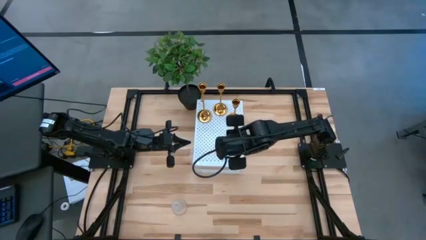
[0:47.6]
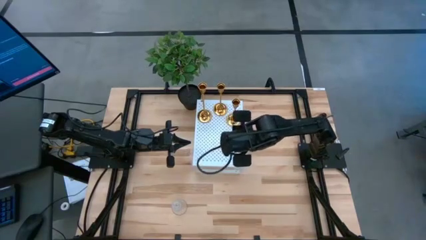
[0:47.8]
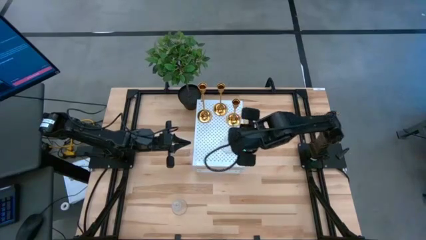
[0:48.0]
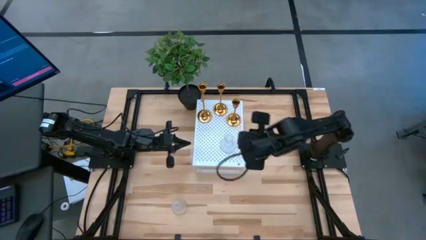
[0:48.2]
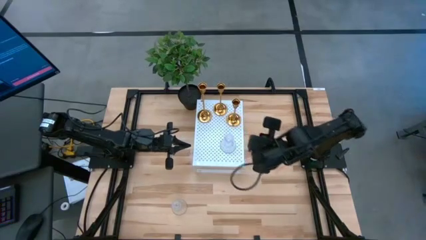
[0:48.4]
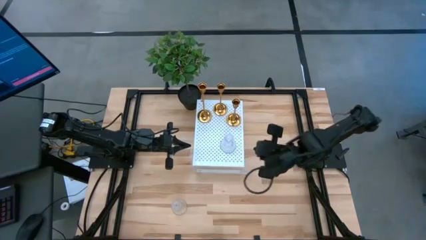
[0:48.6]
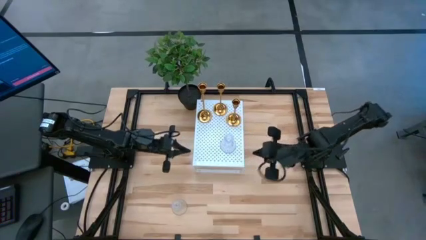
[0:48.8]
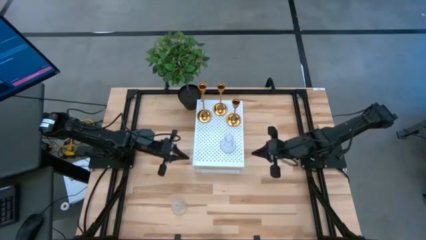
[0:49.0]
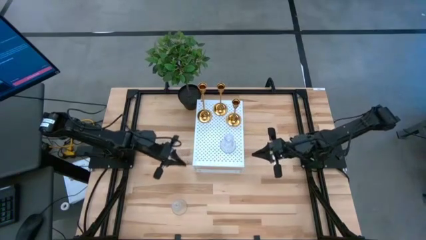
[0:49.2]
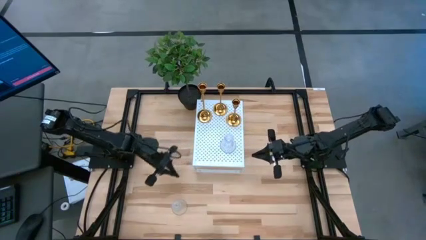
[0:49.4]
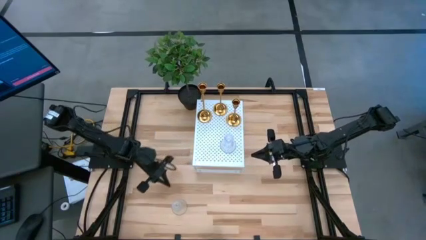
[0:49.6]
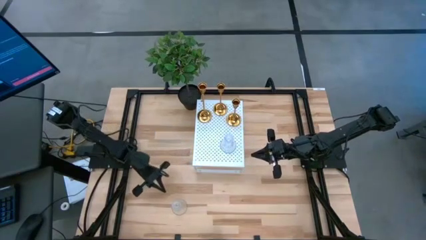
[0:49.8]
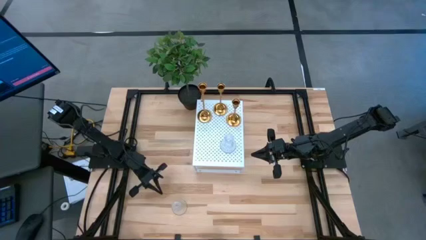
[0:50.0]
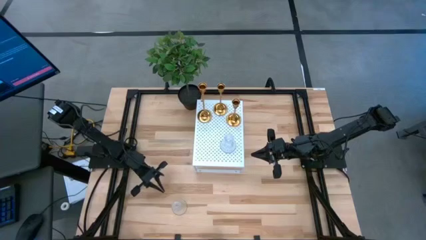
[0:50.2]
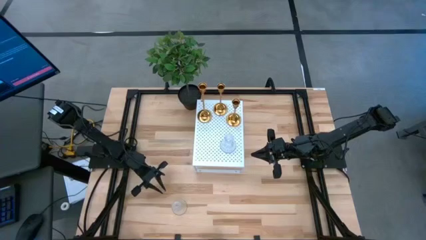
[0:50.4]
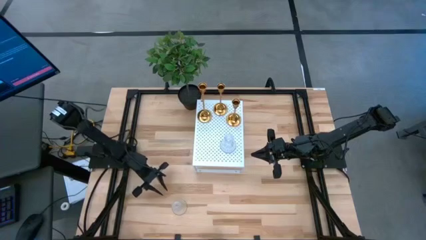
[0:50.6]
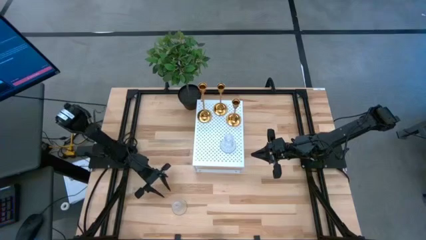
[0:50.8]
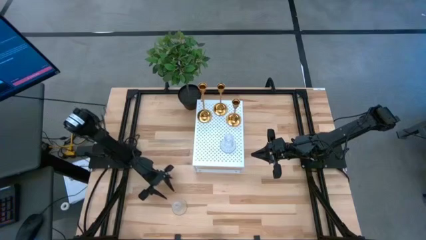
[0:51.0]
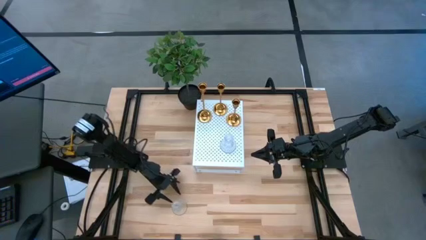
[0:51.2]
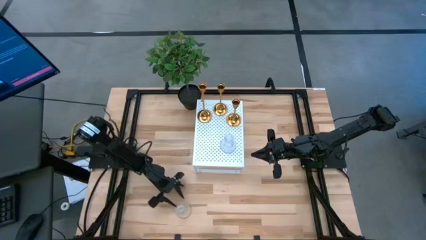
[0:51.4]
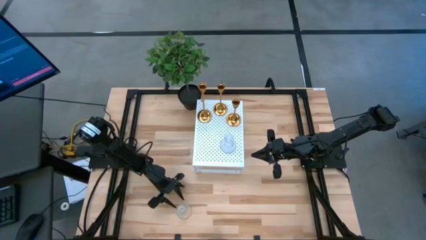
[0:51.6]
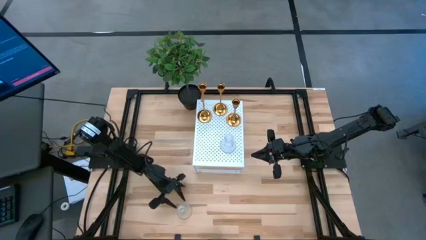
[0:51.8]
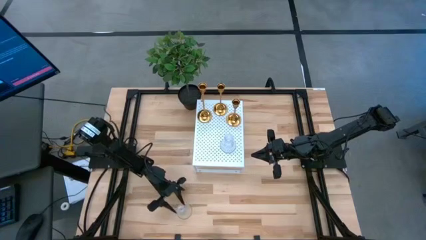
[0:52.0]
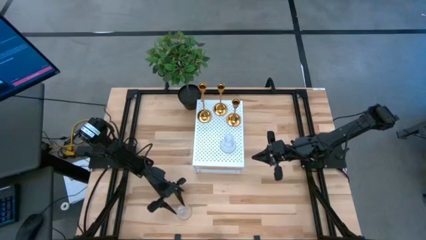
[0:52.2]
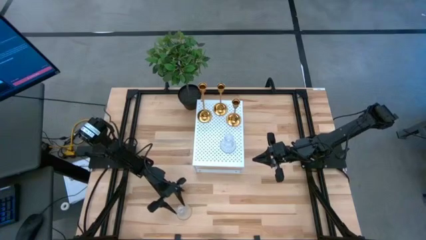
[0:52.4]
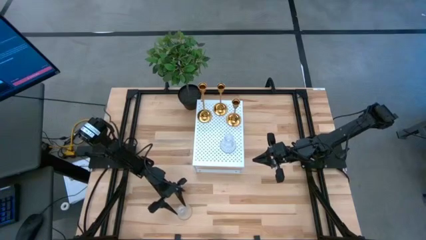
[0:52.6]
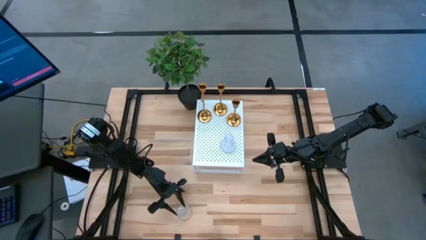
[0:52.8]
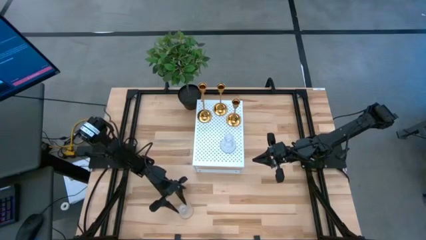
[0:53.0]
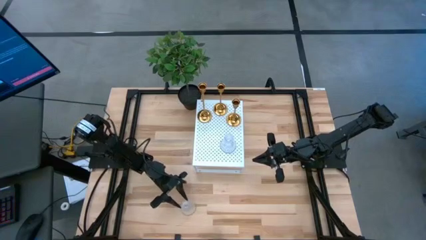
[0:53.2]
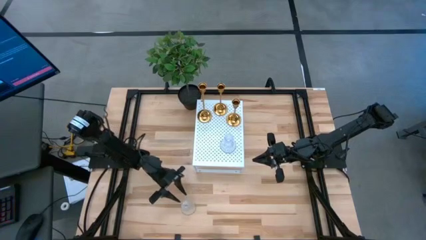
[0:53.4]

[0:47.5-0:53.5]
Task: Pick & Place candle stick holders
Put the transparent candle holder on the shelf

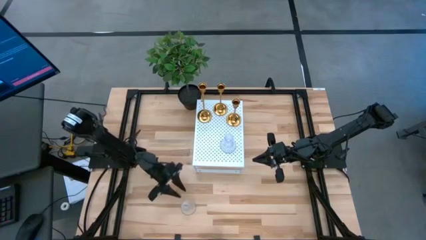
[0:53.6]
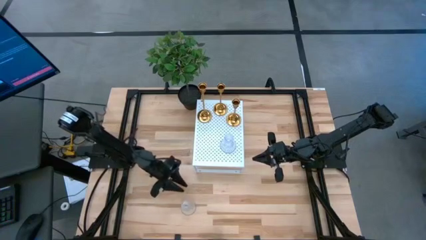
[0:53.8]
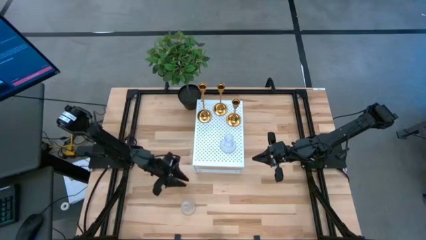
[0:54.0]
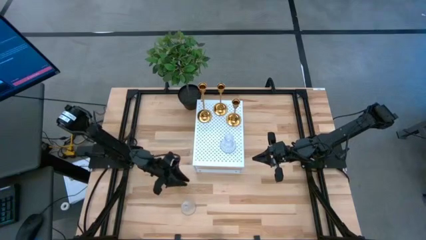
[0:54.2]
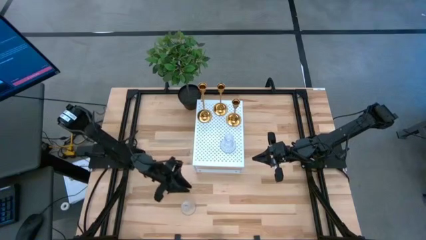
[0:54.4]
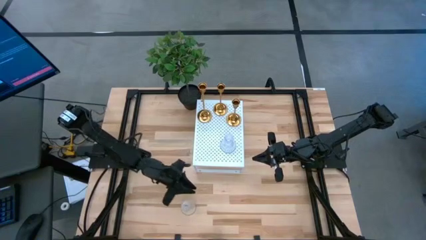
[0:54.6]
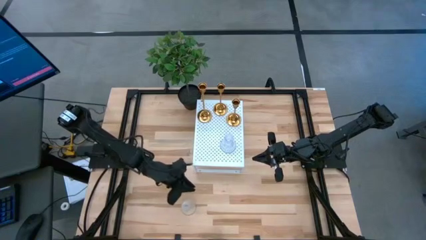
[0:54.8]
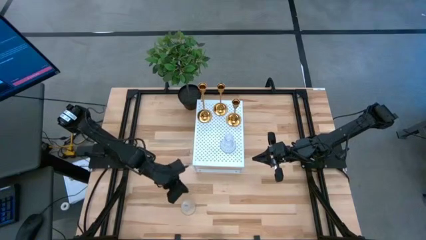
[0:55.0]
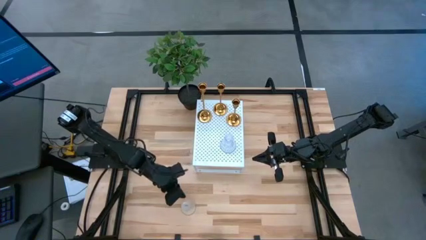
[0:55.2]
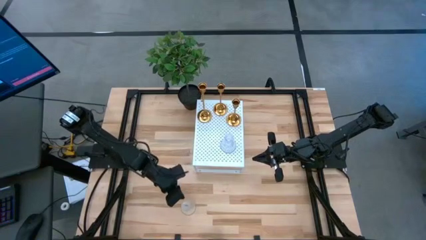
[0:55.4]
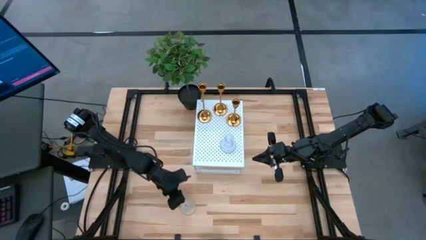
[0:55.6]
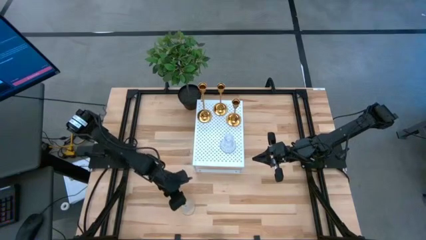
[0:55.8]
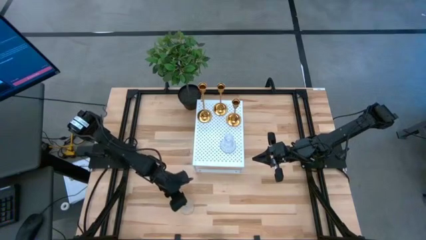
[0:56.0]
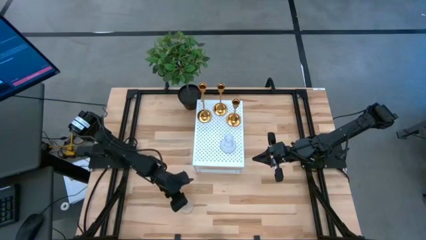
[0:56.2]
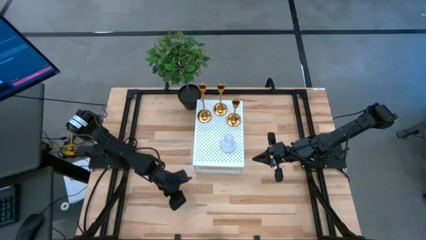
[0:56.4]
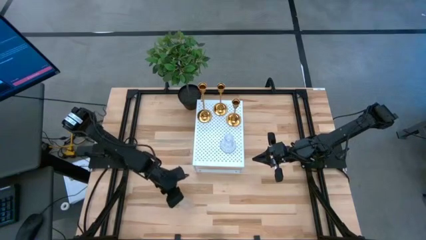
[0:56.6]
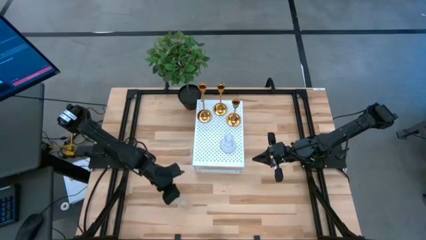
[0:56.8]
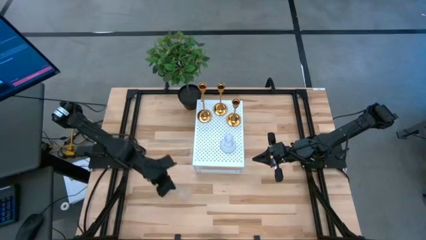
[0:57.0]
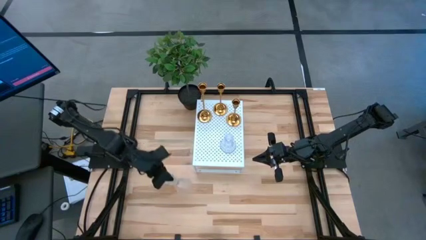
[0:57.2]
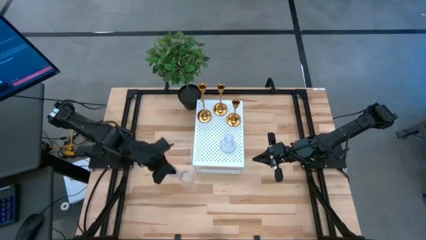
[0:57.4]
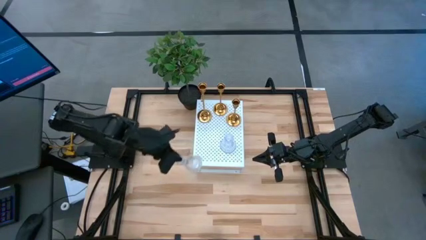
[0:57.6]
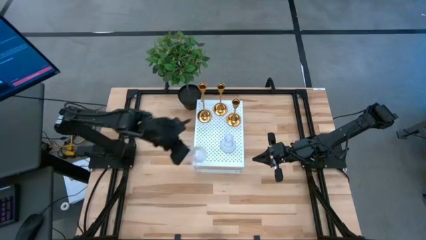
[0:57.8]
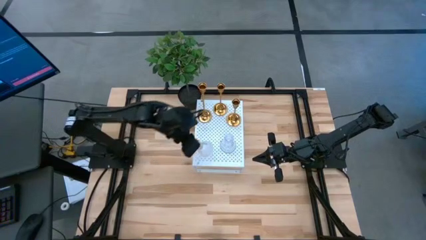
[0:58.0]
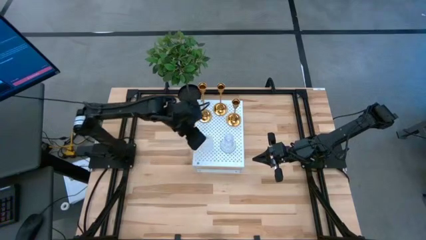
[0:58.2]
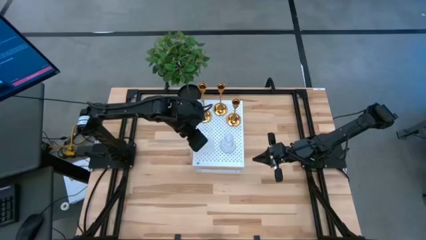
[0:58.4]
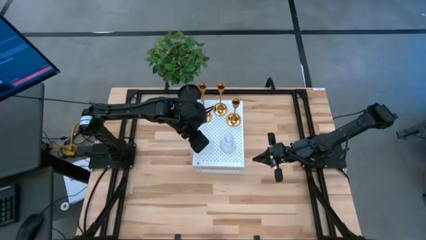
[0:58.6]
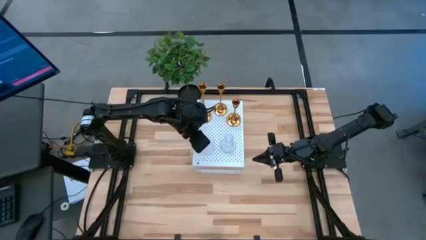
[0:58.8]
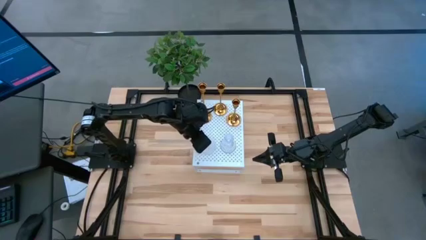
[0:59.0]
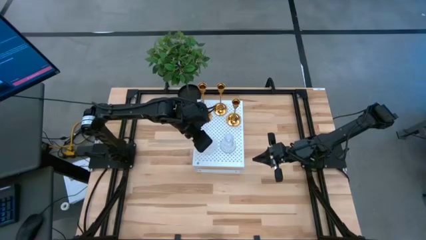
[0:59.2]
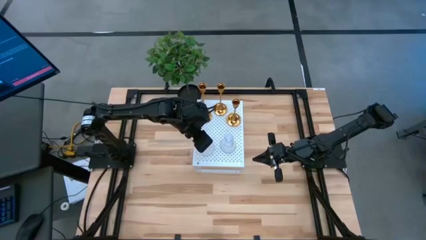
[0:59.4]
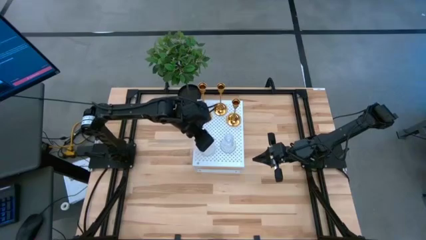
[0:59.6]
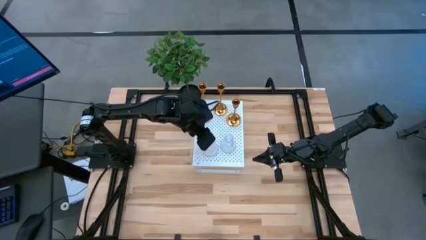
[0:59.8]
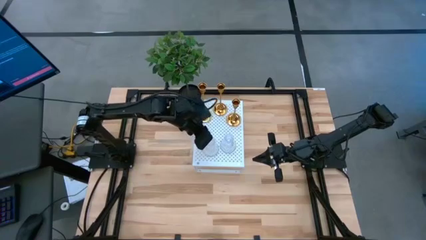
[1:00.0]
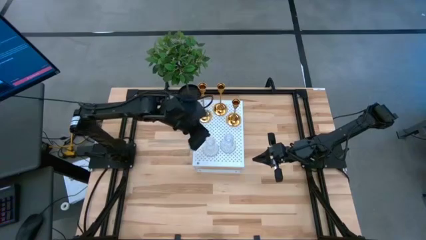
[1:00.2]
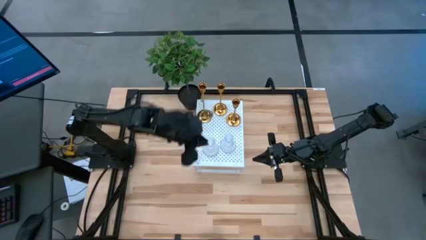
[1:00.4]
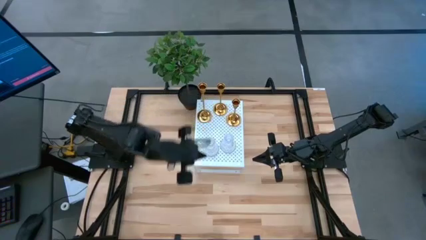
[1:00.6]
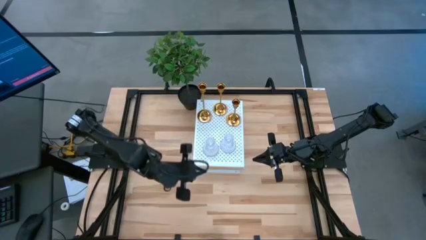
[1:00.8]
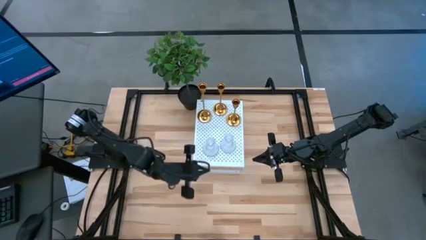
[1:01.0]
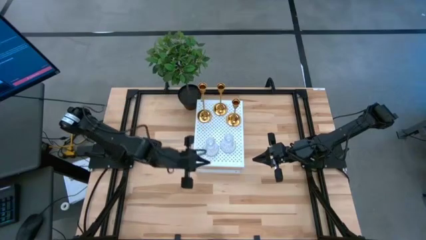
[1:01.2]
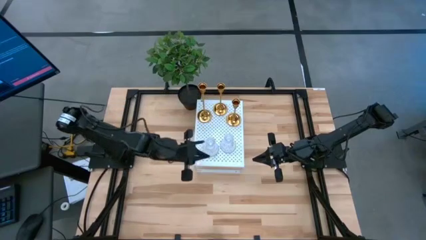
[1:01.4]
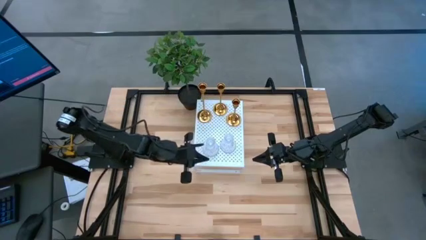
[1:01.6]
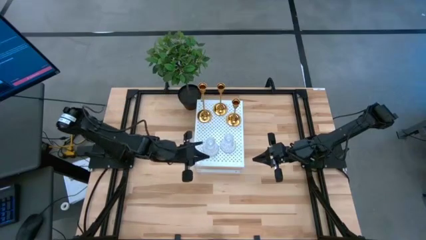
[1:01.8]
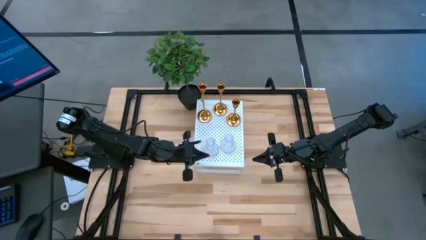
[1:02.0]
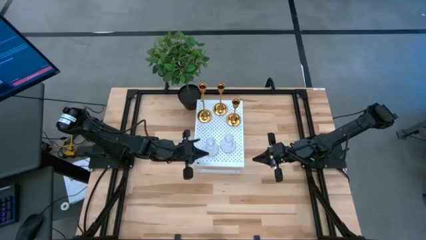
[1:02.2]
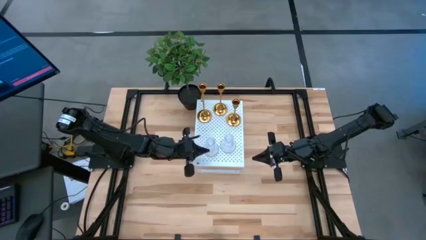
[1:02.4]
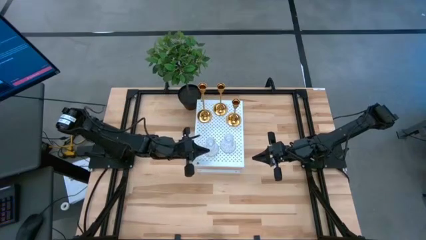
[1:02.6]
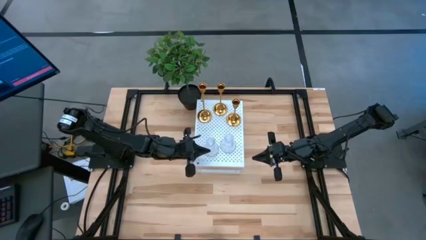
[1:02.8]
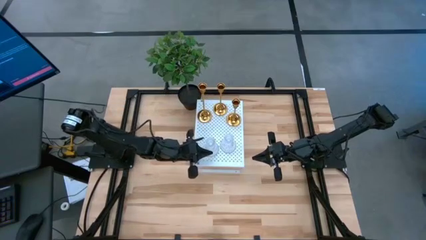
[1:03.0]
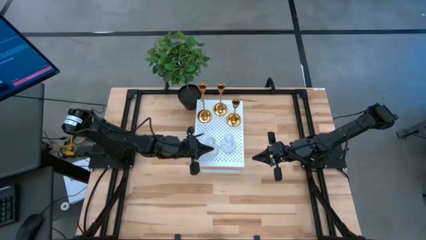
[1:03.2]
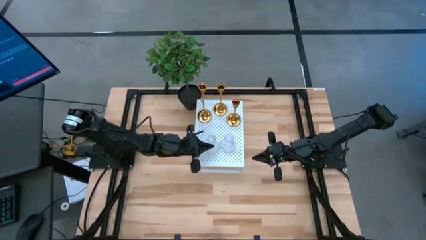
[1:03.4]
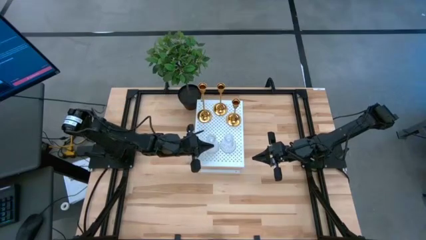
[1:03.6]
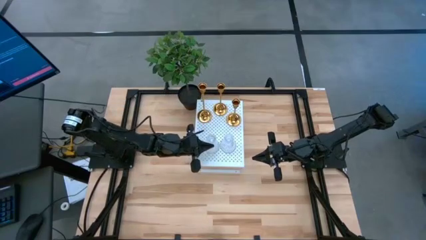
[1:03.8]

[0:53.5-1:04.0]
Put the transparent candle holder on the shelf
